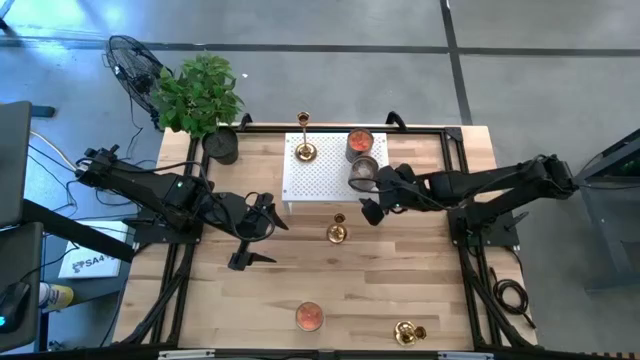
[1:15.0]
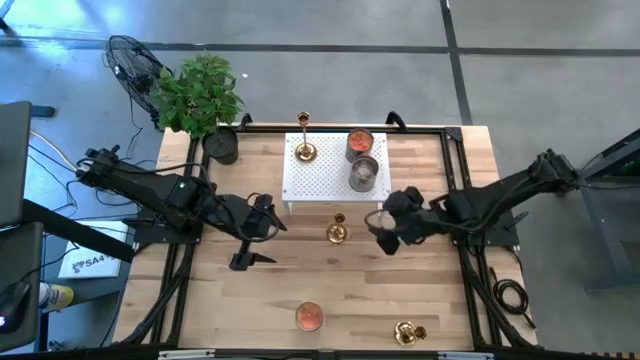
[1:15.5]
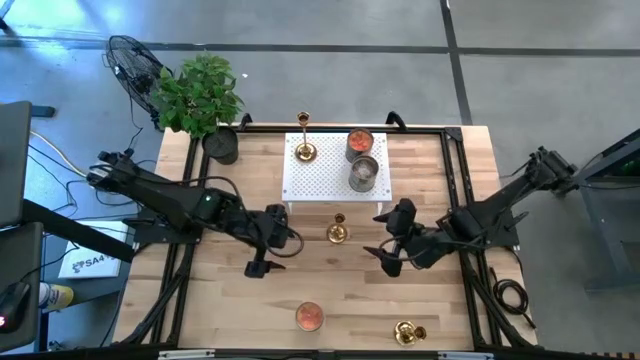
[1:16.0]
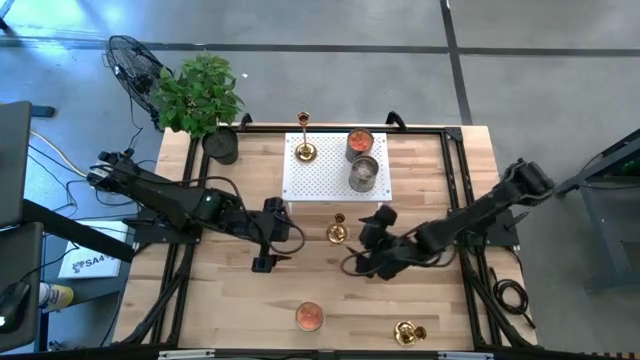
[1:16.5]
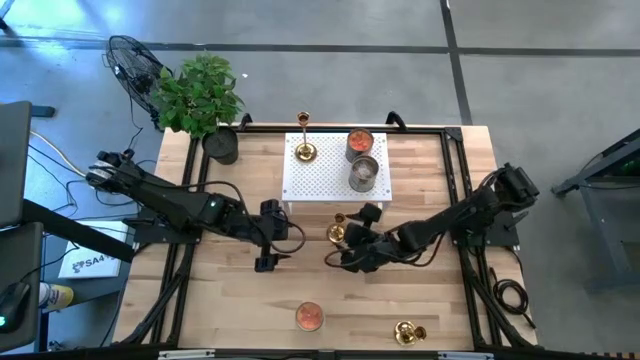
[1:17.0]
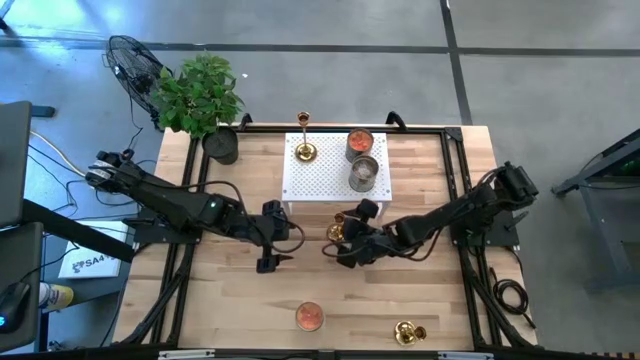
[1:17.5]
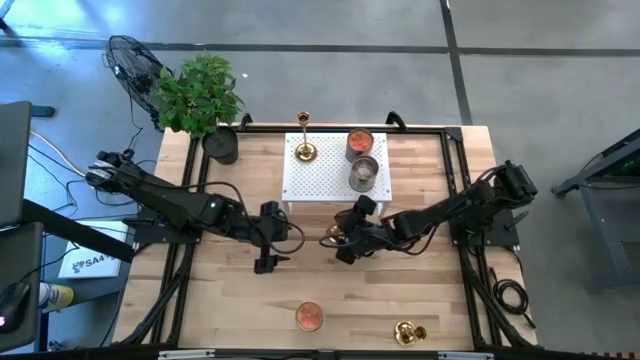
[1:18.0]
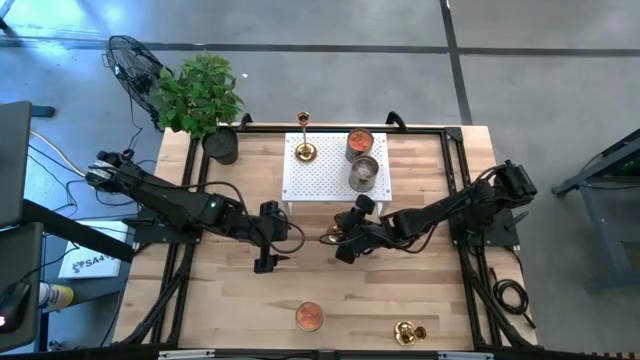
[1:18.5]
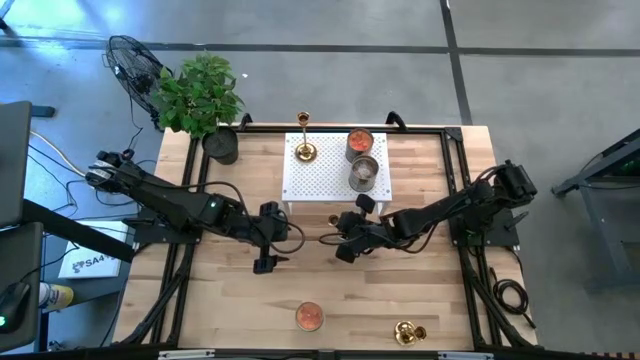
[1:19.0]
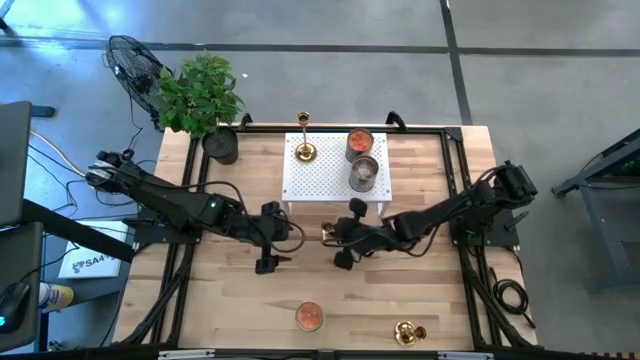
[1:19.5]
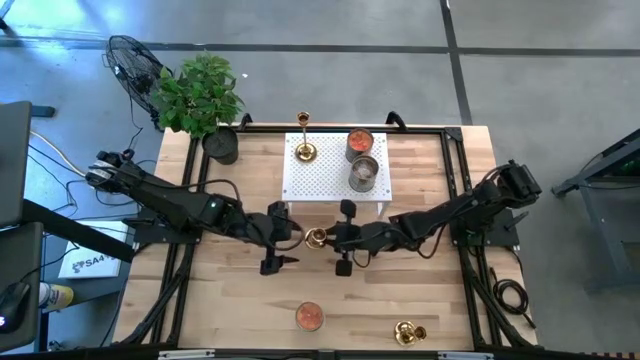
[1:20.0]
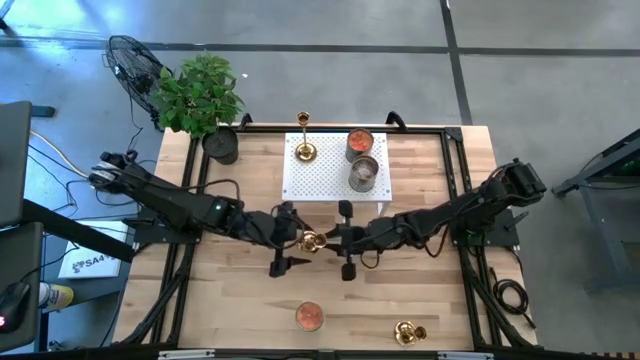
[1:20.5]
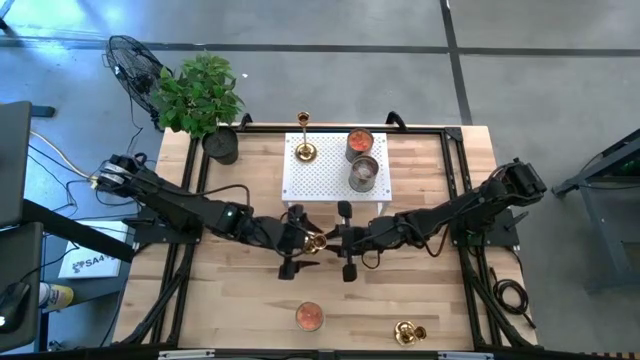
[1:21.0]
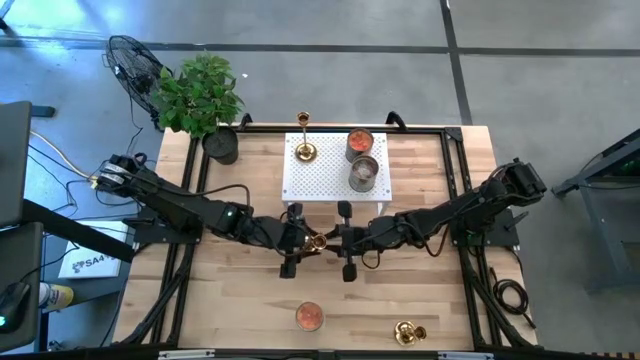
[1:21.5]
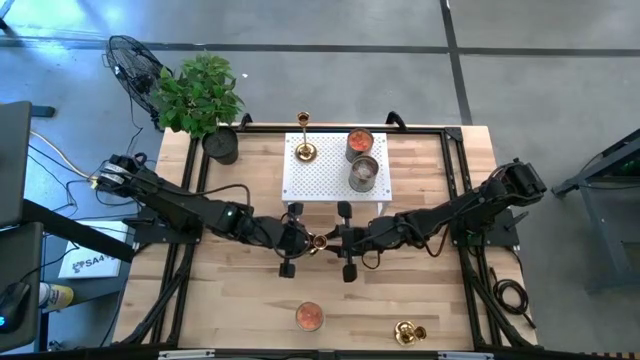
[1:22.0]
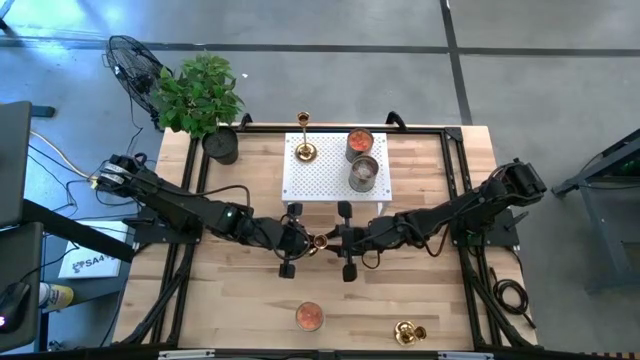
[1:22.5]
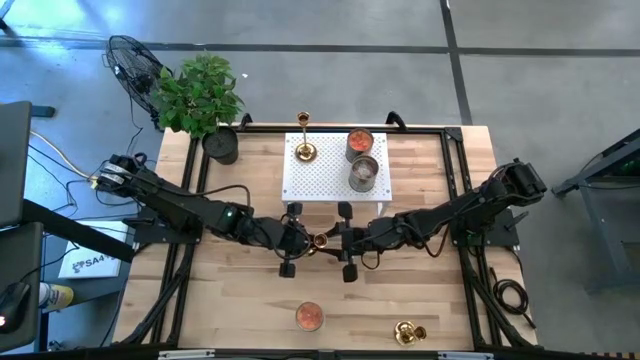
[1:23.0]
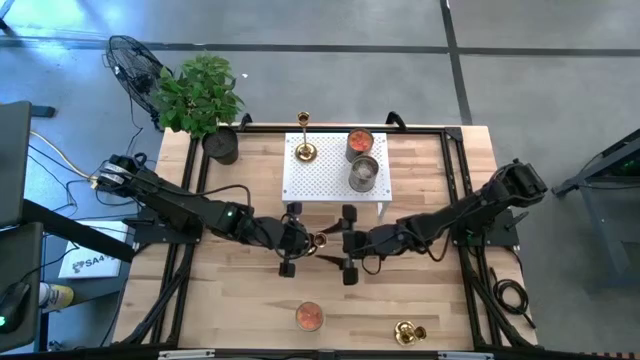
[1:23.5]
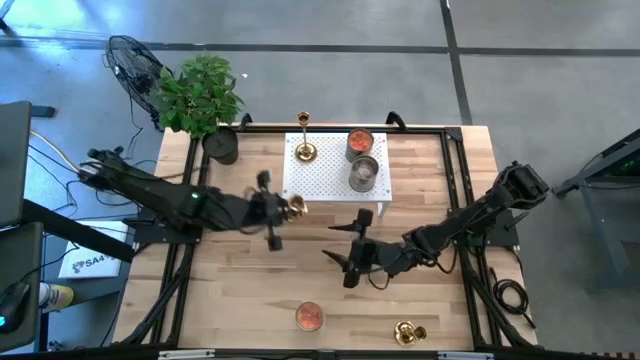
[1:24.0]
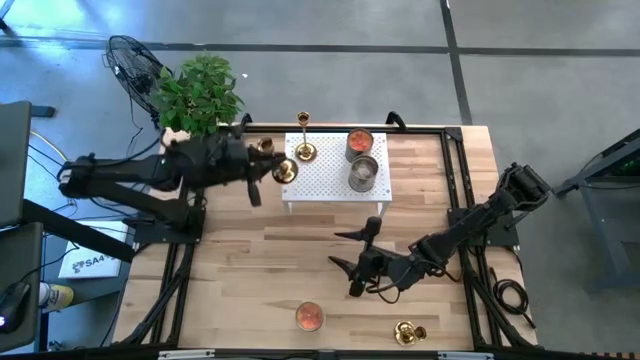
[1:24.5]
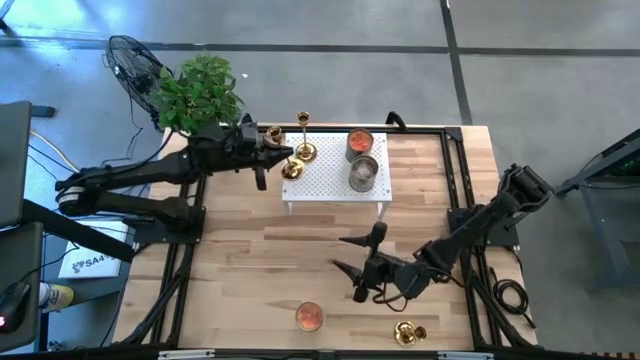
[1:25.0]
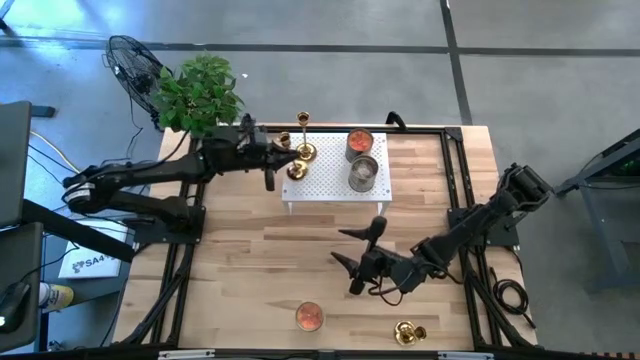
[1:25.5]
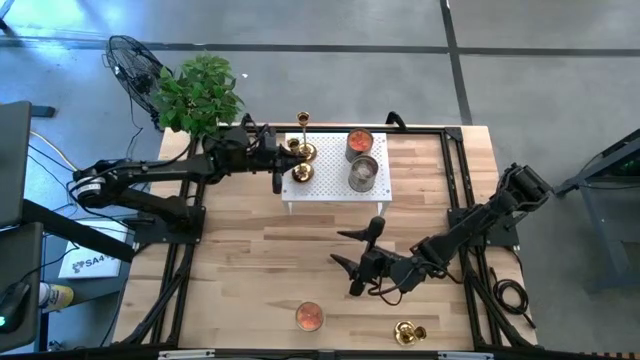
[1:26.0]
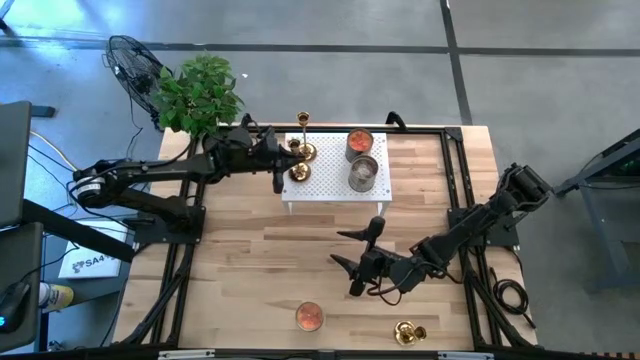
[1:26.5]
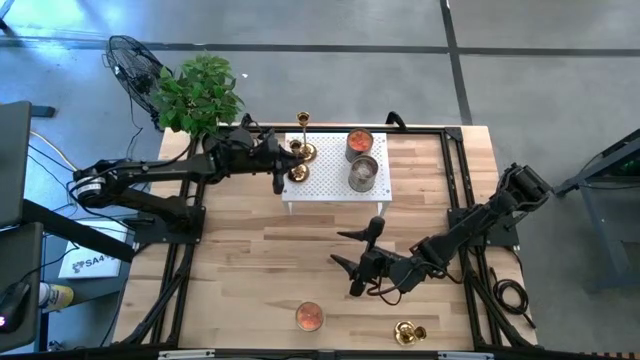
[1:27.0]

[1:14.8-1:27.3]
Task: Pick & Place candle stick holders
Put the top gold holder on the shelf

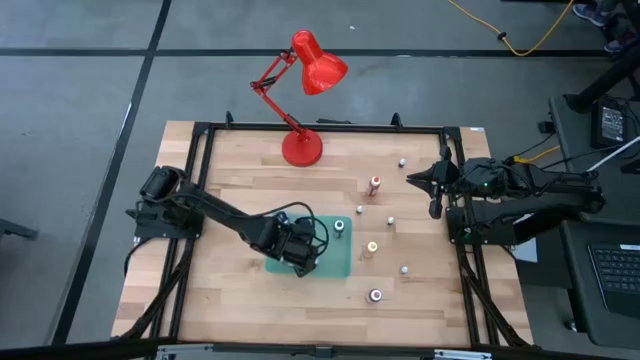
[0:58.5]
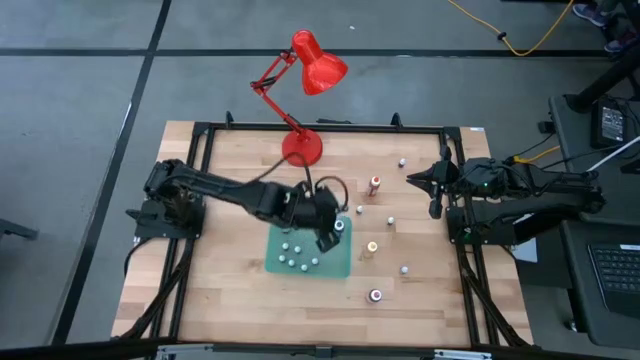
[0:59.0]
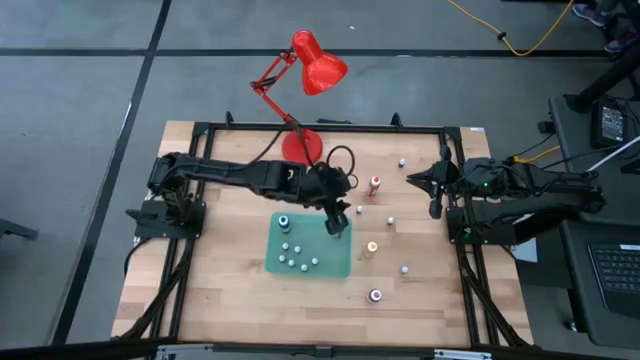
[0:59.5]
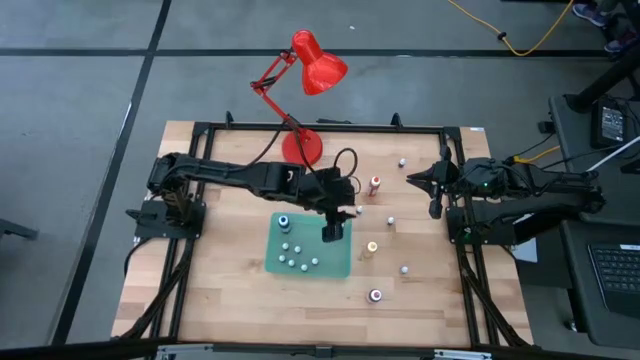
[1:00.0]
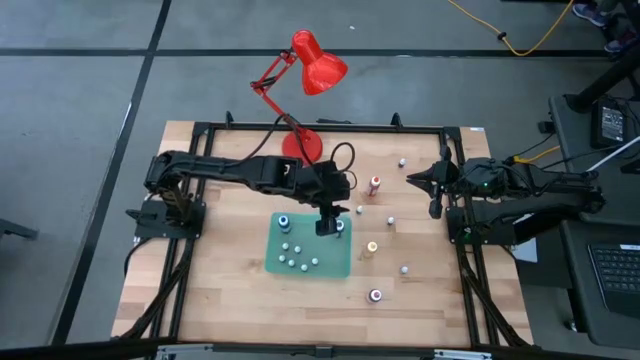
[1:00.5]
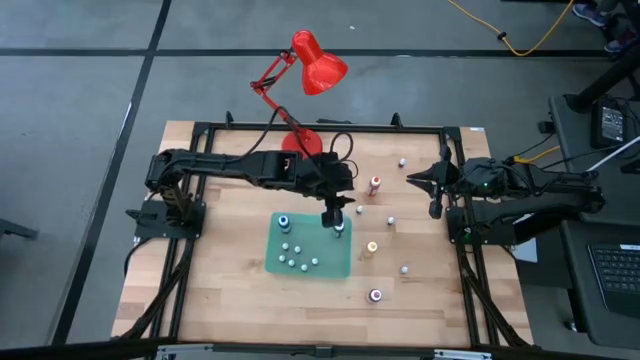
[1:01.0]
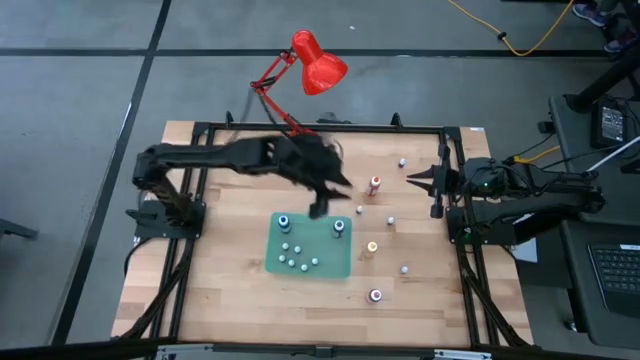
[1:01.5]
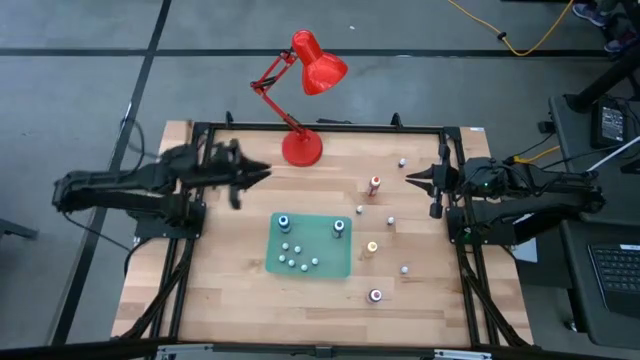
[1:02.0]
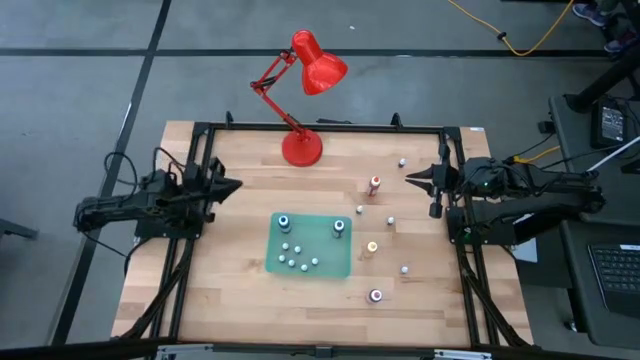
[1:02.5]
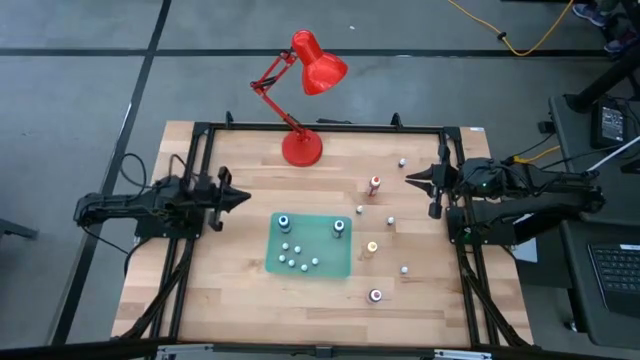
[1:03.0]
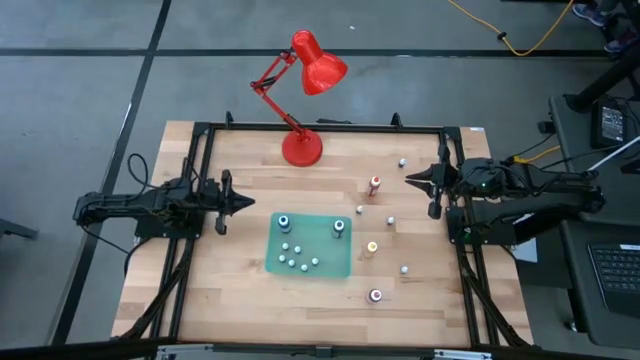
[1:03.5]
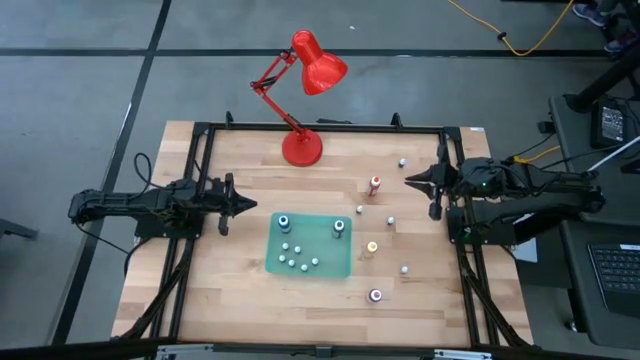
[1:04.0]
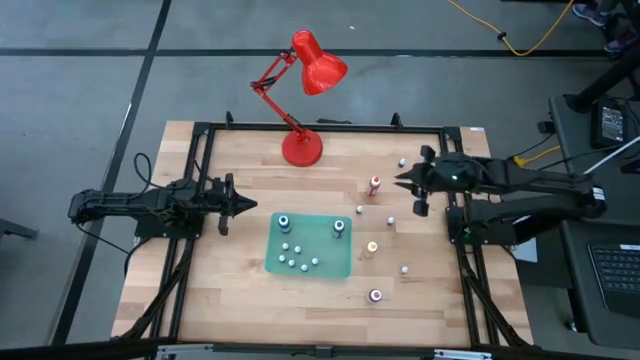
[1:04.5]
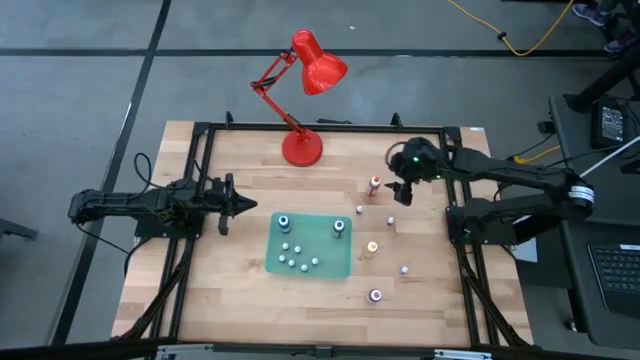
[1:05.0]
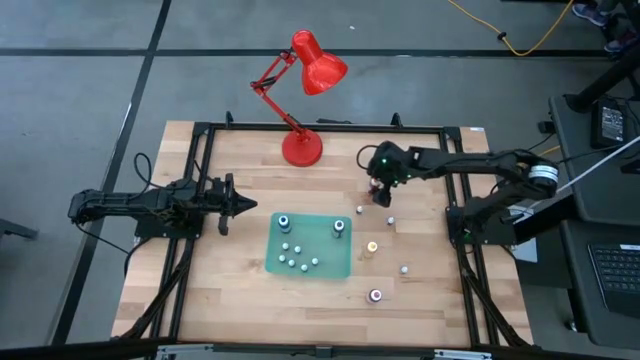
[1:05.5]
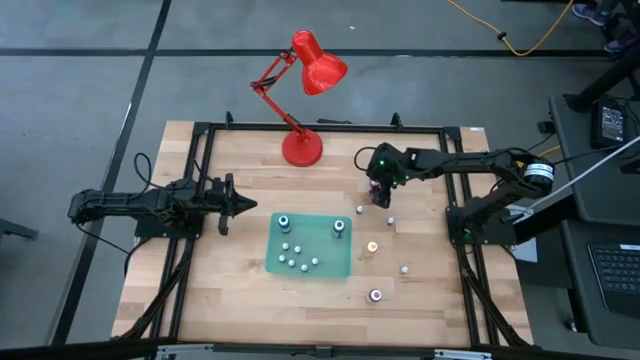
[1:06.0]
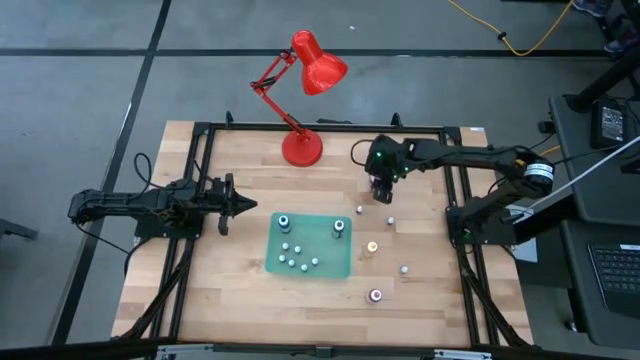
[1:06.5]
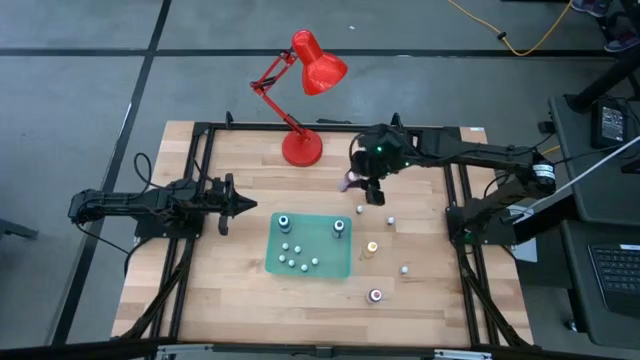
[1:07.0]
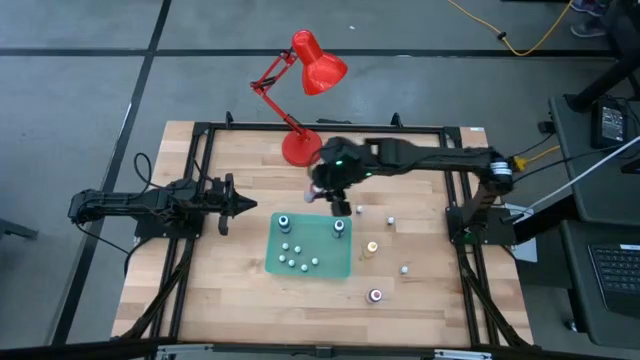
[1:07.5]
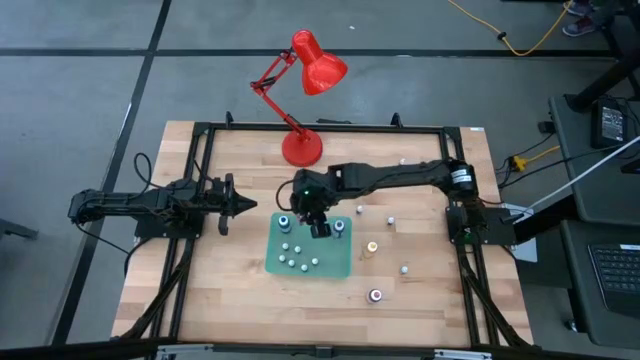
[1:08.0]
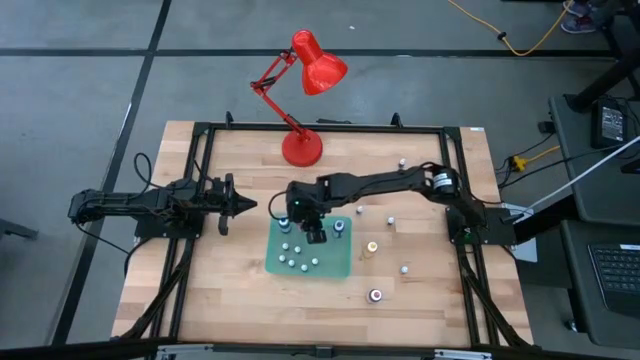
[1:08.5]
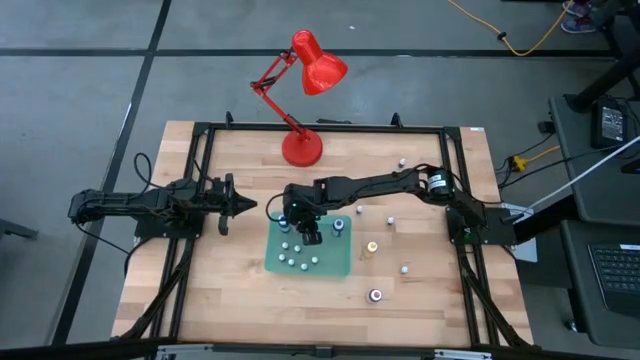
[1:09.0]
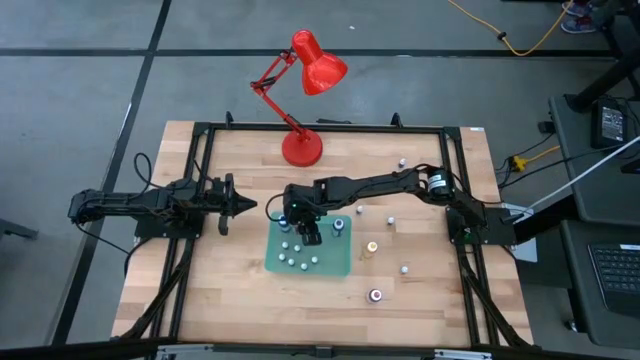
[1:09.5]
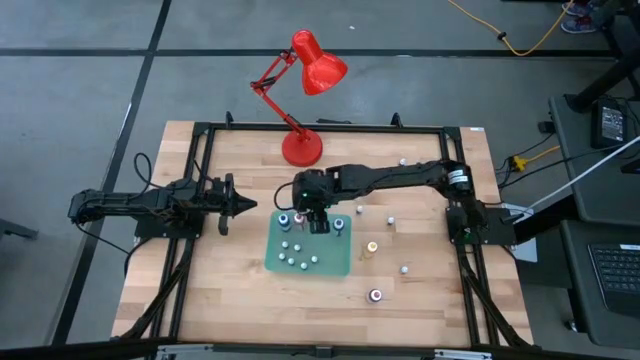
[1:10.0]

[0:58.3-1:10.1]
Task: Pick & Place food coloring
Put the large orange bottle into the green bin
